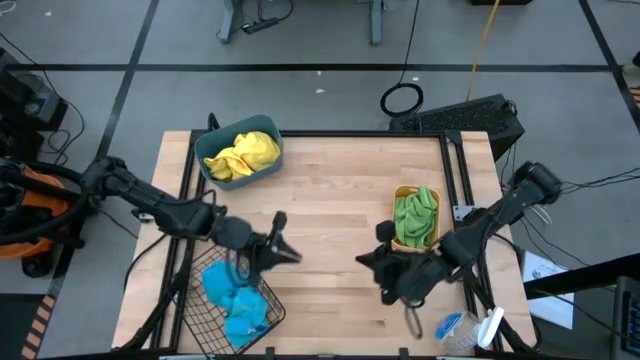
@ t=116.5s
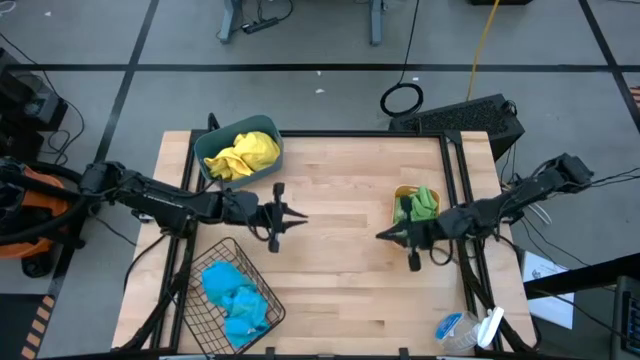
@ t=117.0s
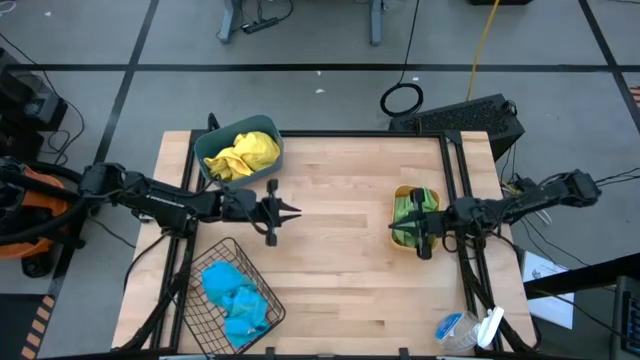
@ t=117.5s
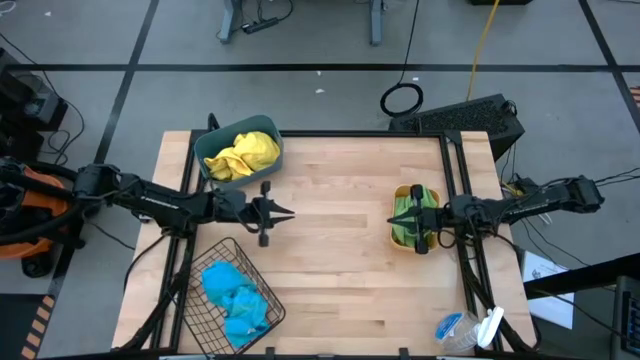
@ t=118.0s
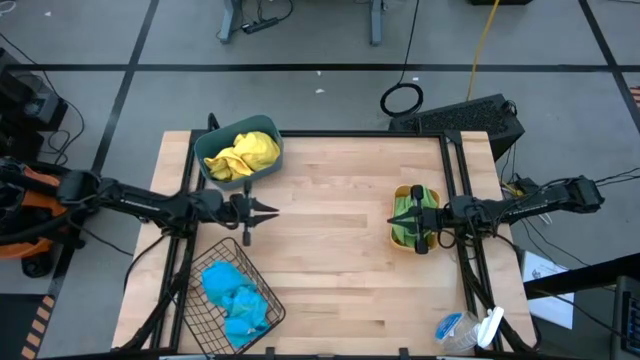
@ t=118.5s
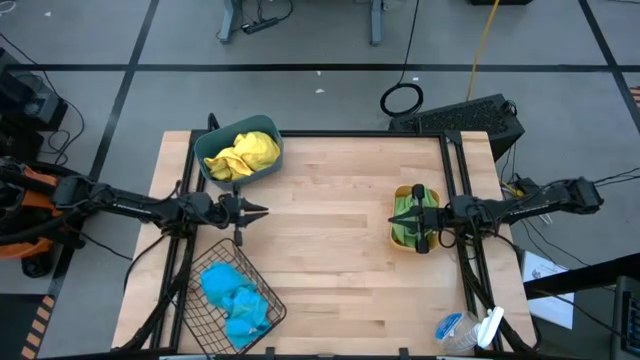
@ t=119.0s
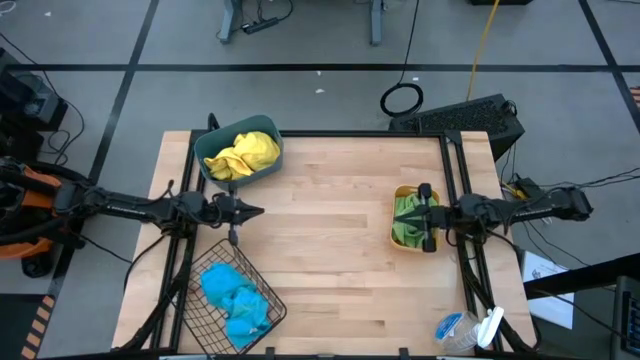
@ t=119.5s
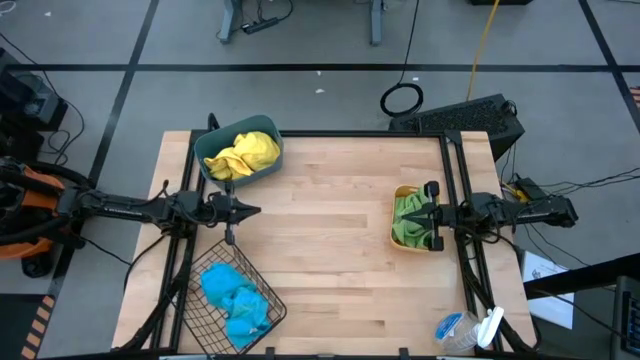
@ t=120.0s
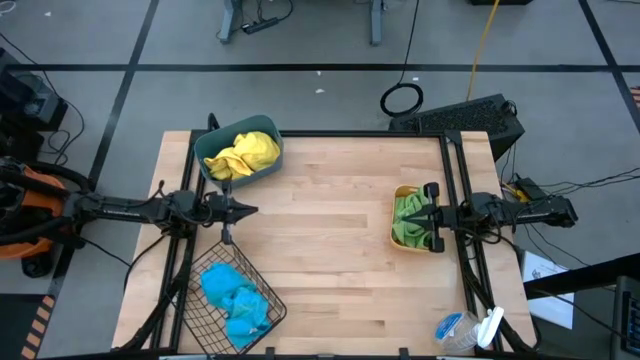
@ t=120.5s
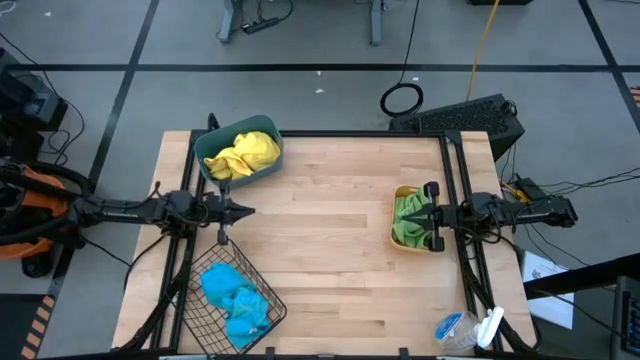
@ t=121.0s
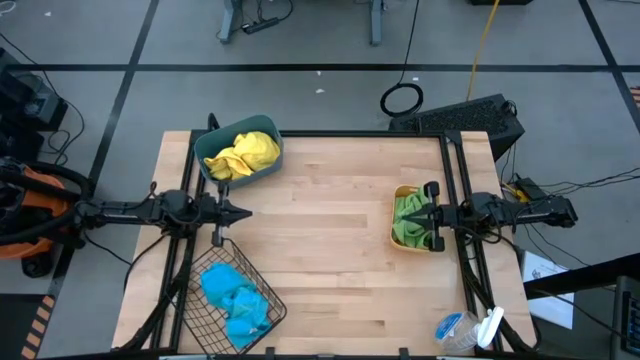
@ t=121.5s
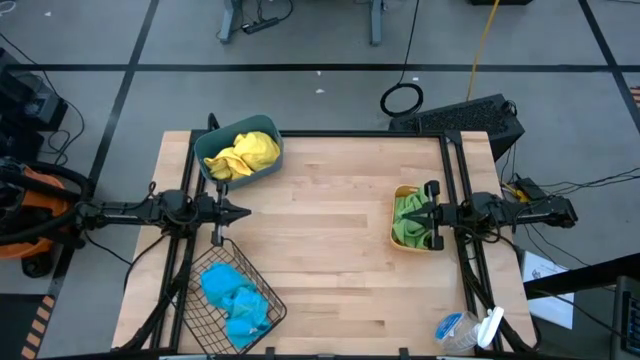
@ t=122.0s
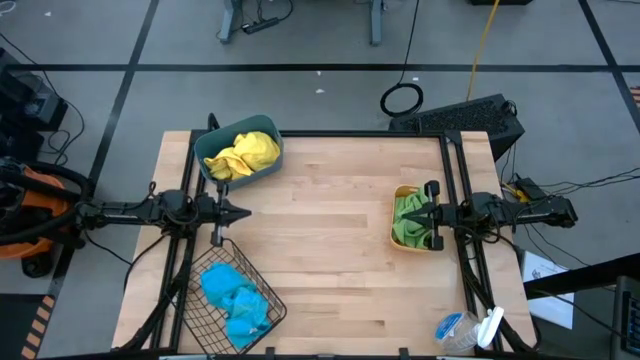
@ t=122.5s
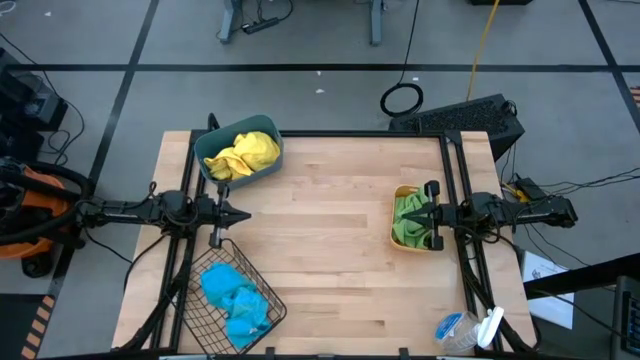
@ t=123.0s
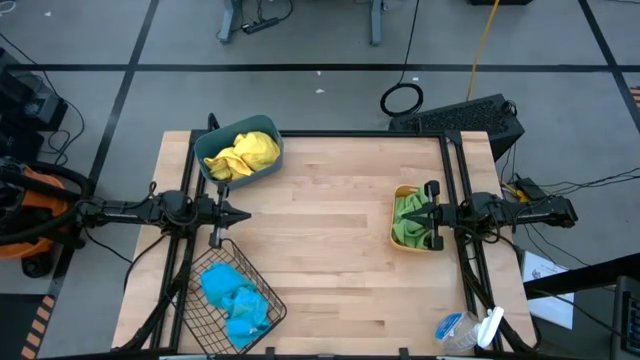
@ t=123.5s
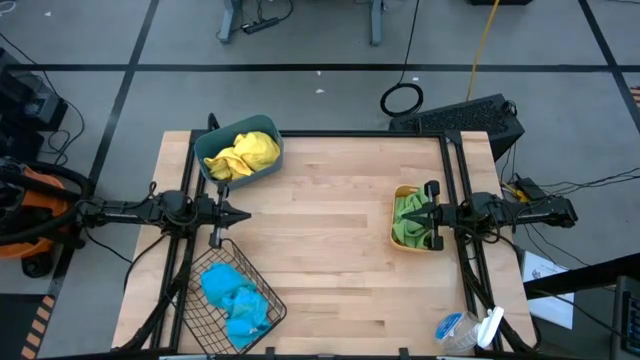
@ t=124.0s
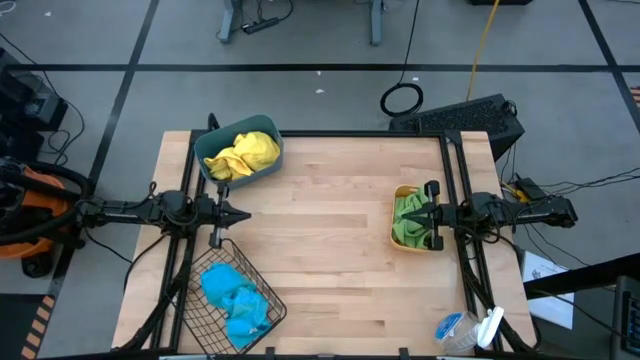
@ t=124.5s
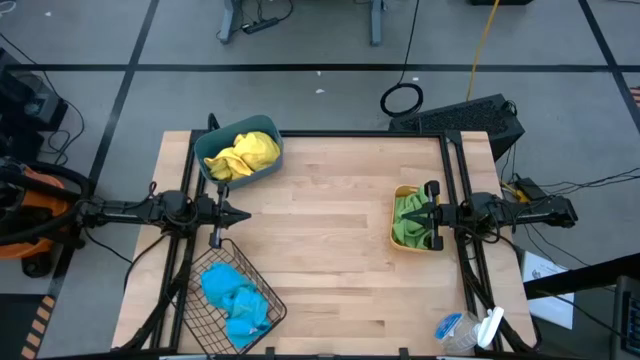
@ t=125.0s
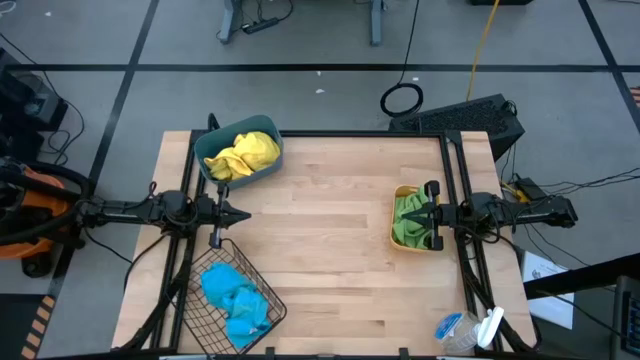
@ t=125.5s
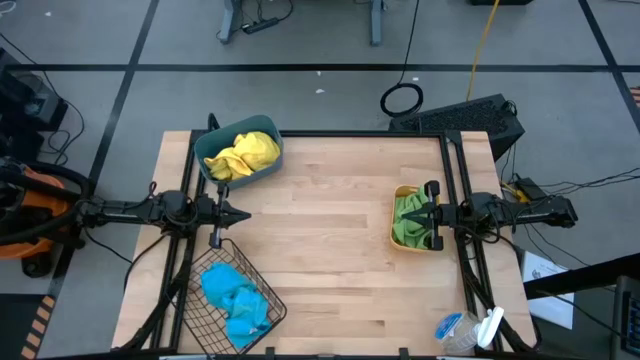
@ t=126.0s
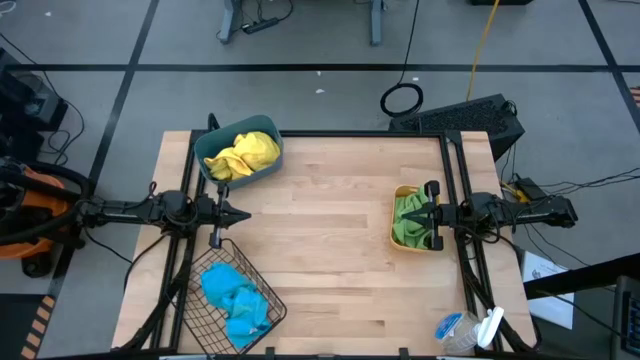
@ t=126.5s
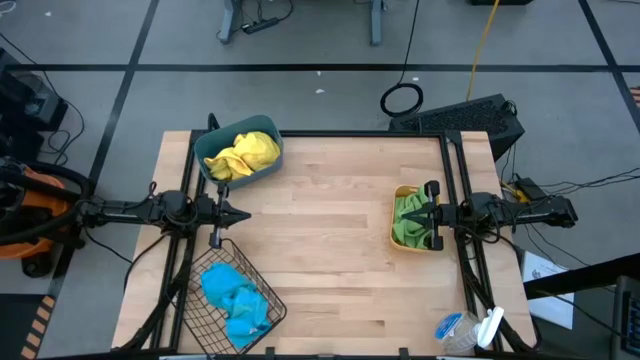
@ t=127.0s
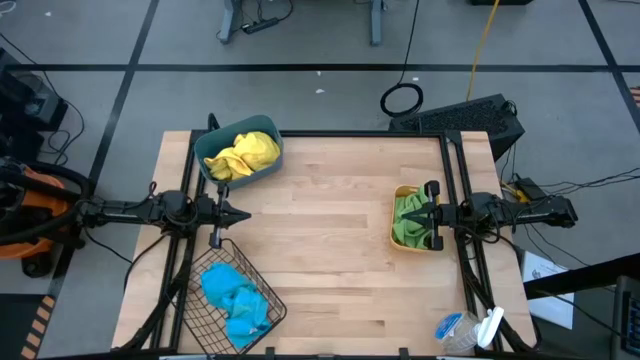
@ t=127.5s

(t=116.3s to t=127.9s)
Task: Sort microfiber towel by color & place in baskets
Return to home position

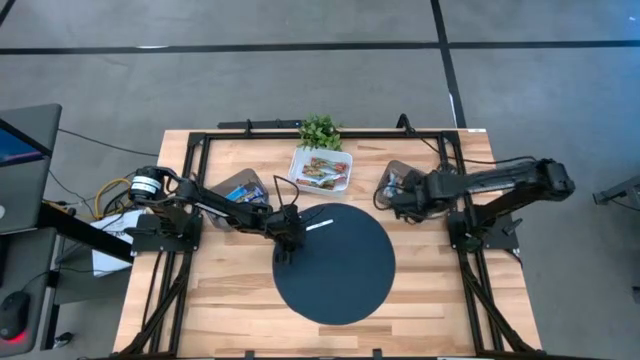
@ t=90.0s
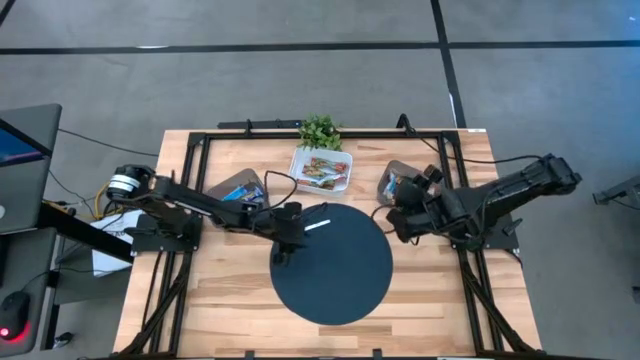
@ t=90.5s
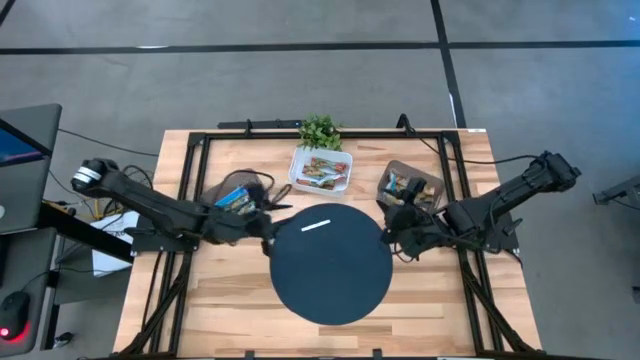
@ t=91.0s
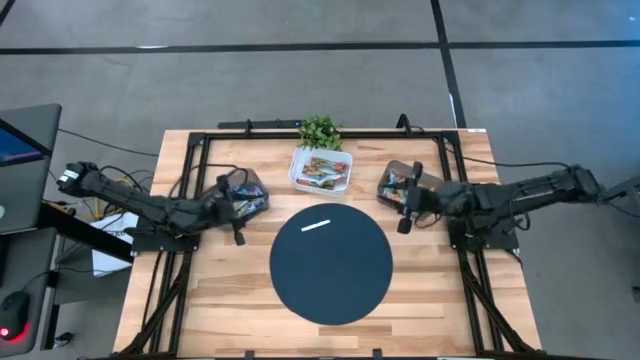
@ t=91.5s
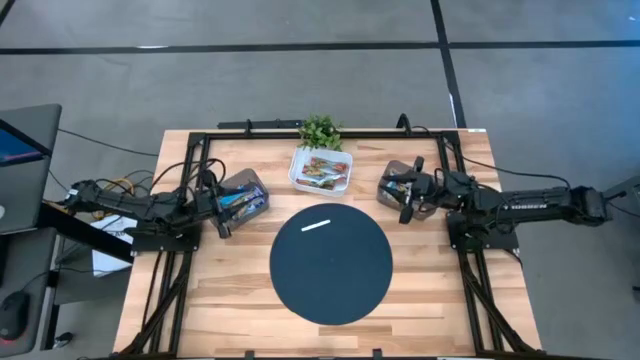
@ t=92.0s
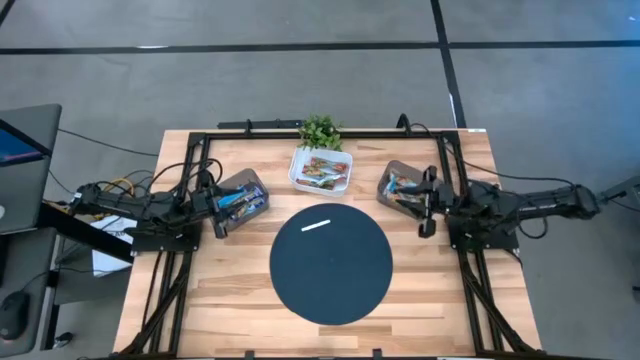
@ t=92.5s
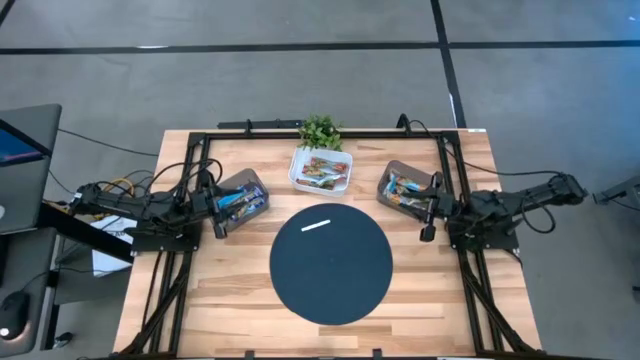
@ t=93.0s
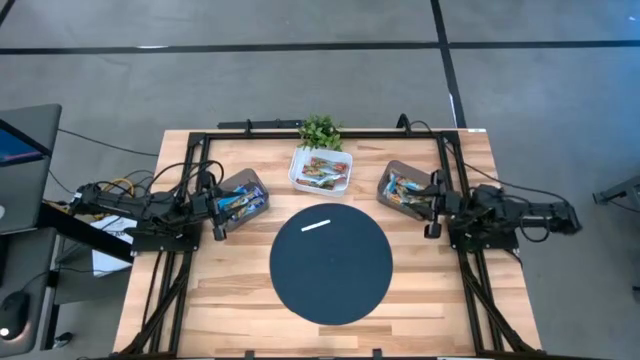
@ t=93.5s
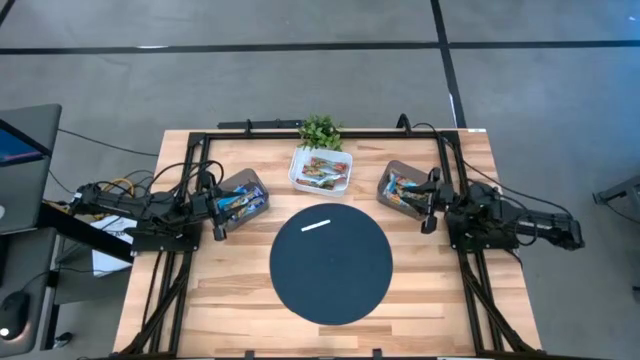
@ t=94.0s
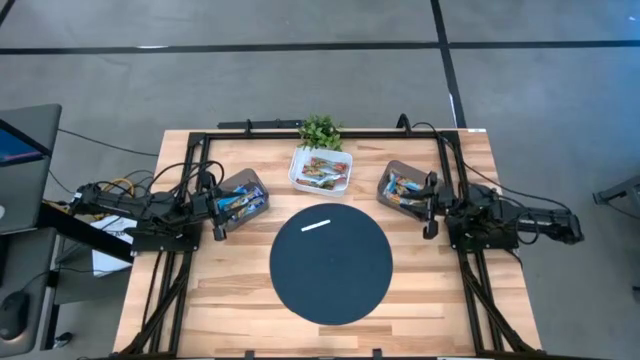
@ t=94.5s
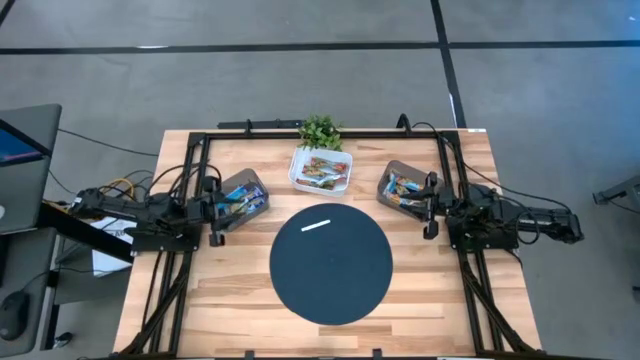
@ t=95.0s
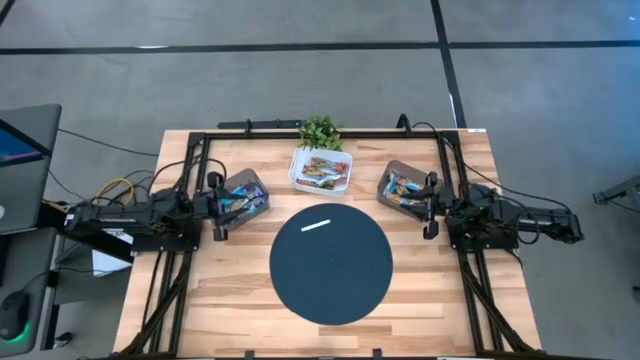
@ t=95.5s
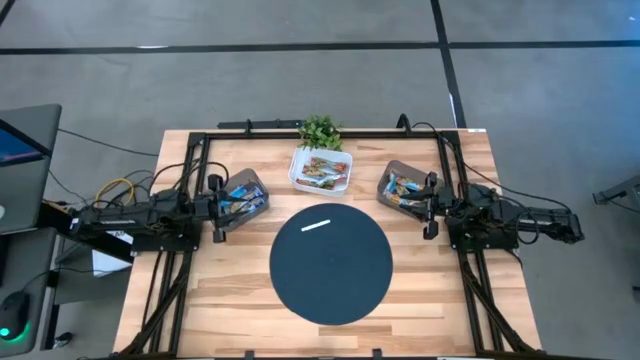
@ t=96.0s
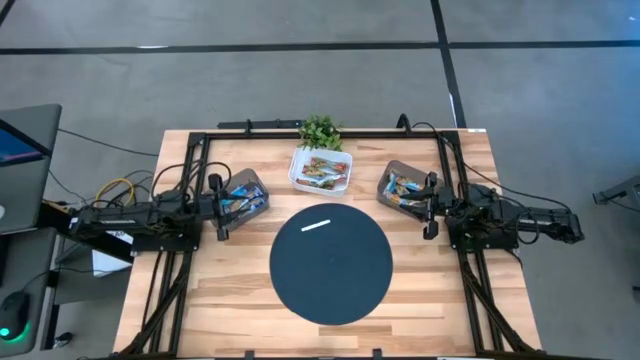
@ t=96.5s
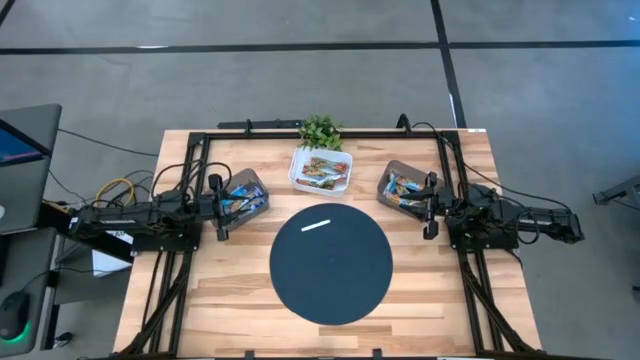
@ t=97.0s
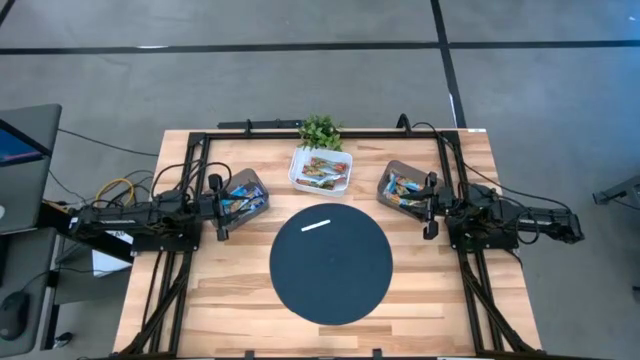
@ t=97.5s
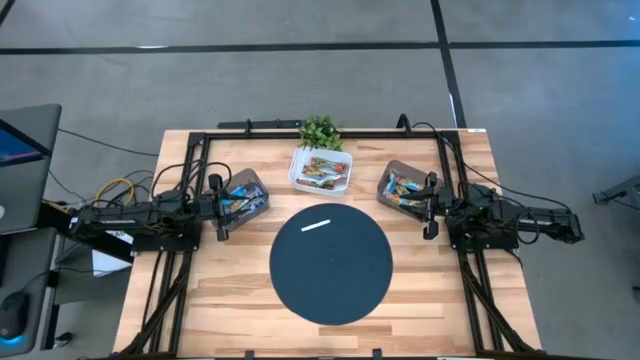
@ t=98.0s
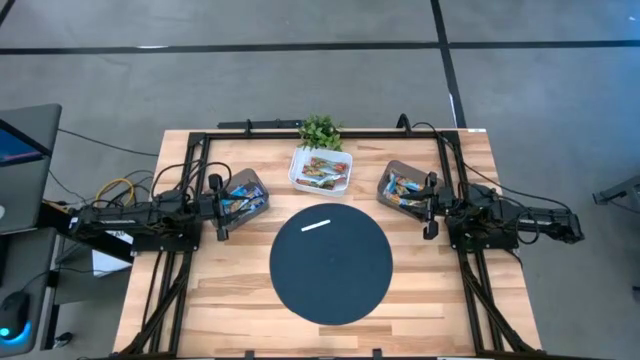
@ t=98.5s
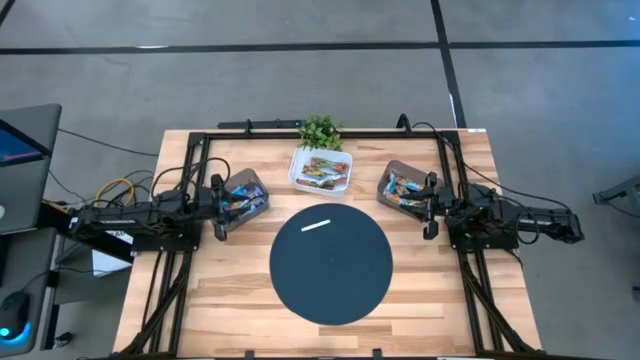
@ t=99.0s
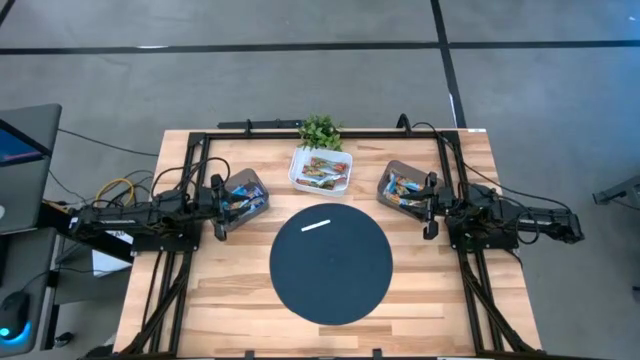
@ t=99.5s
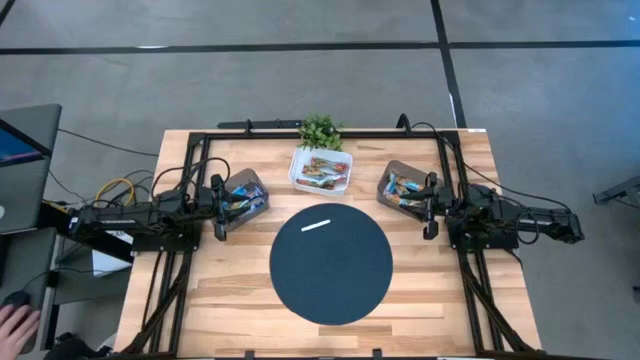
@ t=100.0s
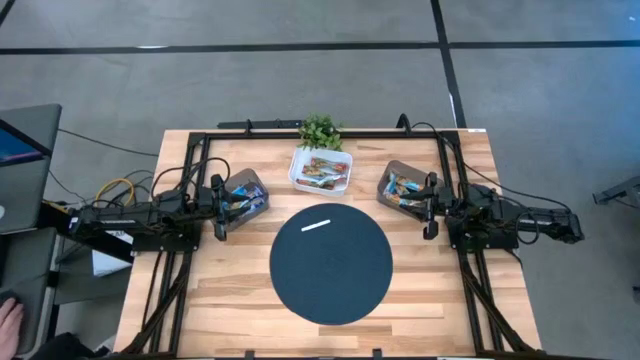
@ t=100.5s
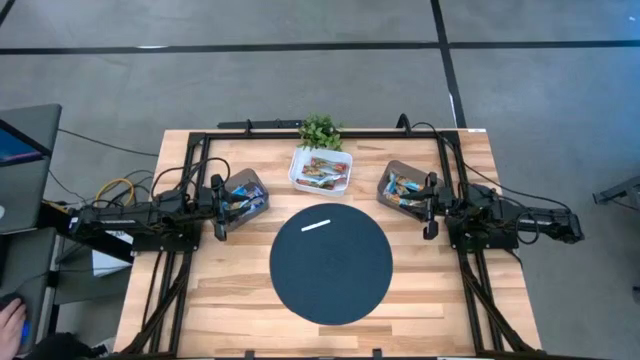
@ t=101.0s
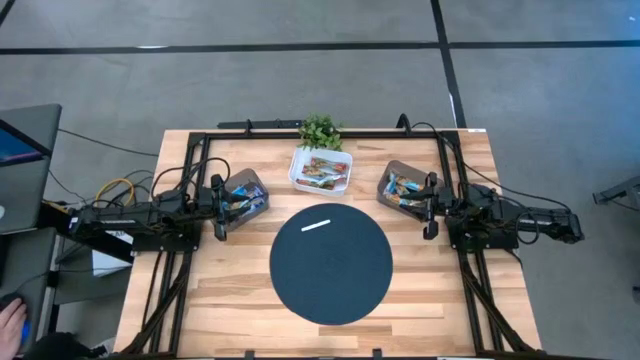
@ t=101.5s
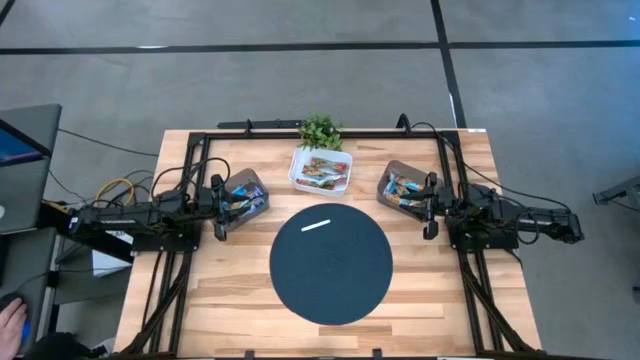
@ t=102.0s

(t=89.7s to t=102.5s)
Task: Pick and place Granola Bars by type
Return to Home Position
